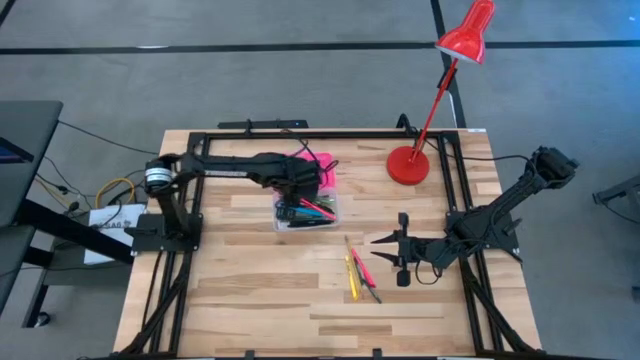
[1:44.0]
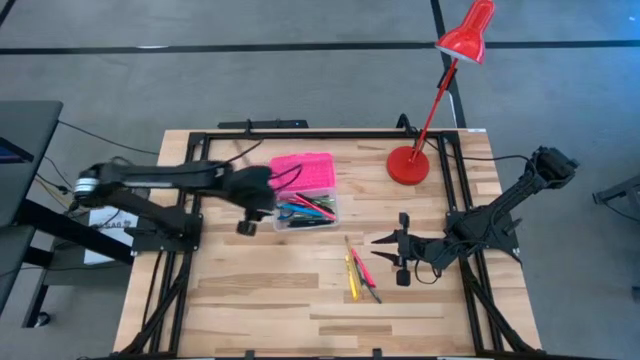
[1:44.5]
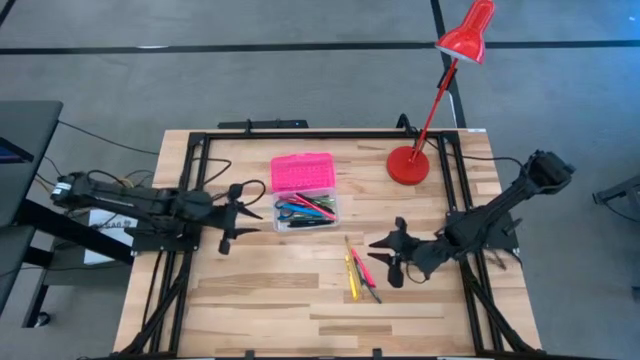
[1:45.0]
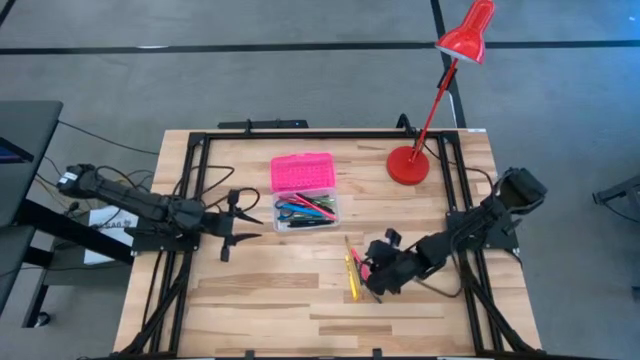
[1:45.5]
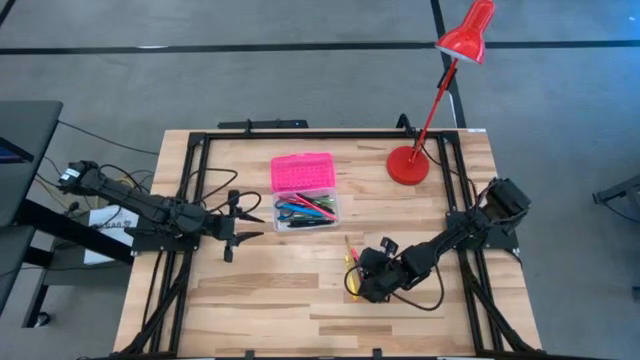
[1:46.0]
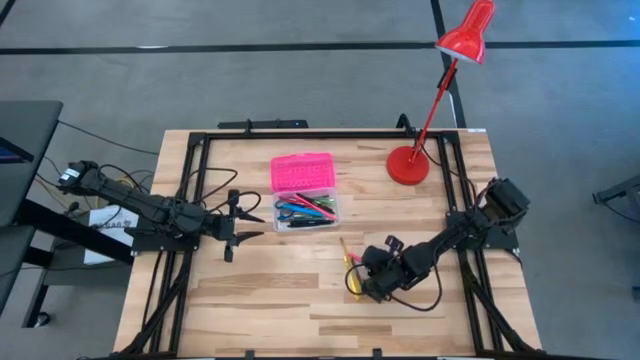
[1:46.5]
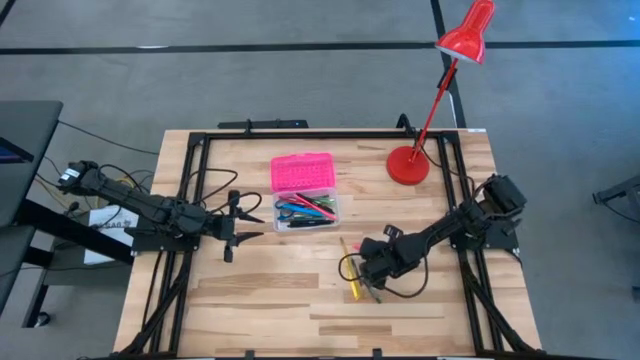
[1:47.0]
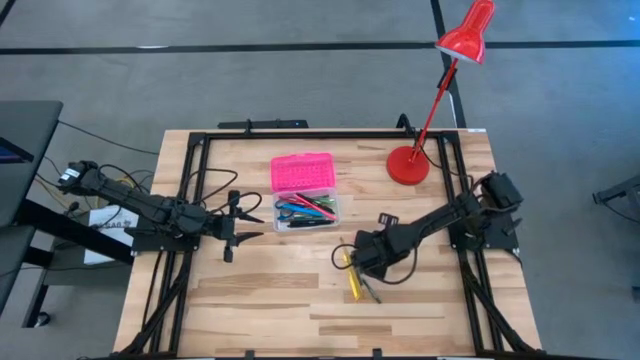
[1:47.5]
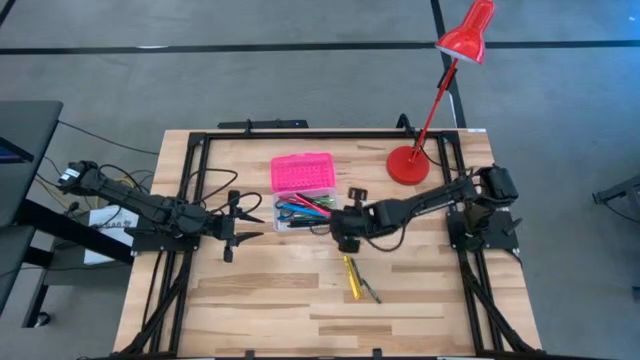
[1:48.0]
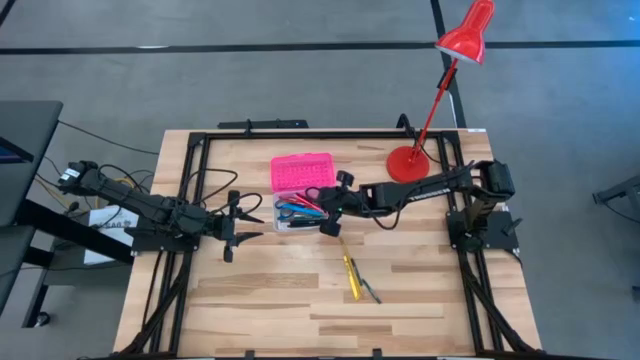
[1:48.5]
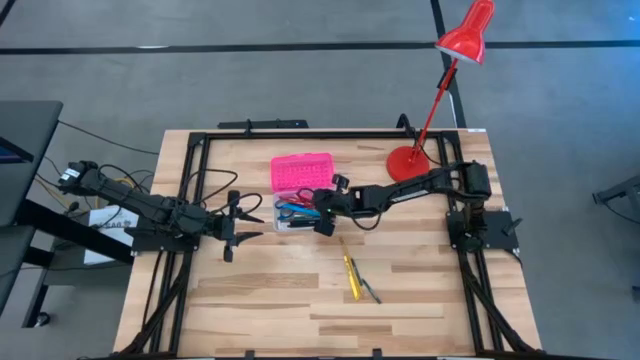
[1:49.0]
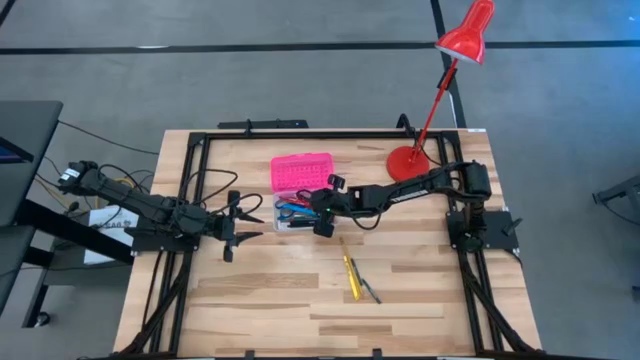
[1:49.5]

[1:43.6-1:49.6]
Task: Pick & place school supplies into a supply box
Put the pink pen into the pink supply box

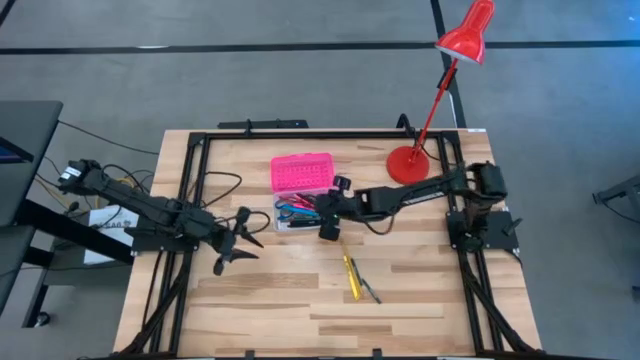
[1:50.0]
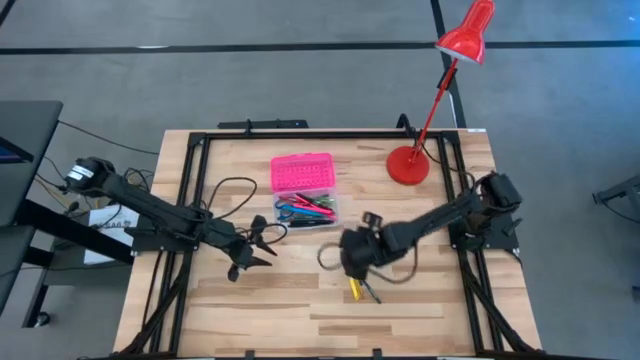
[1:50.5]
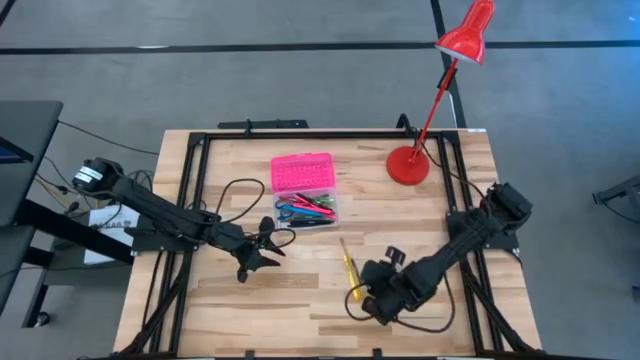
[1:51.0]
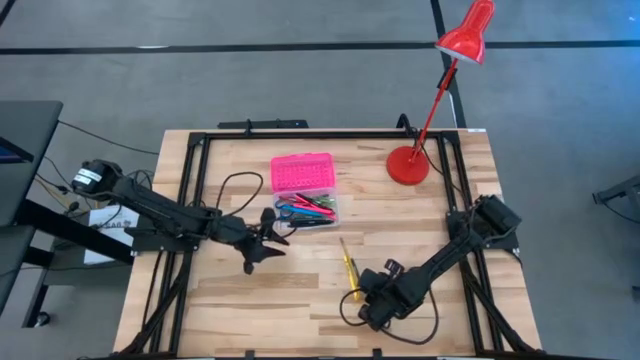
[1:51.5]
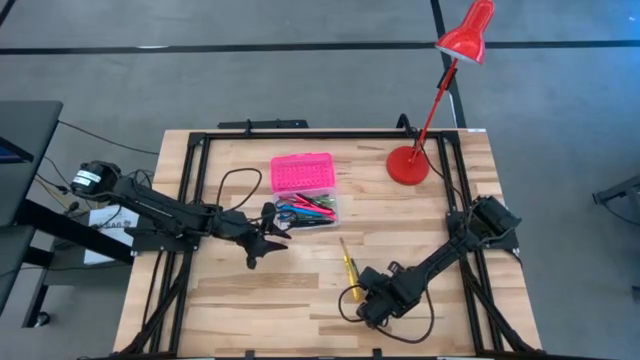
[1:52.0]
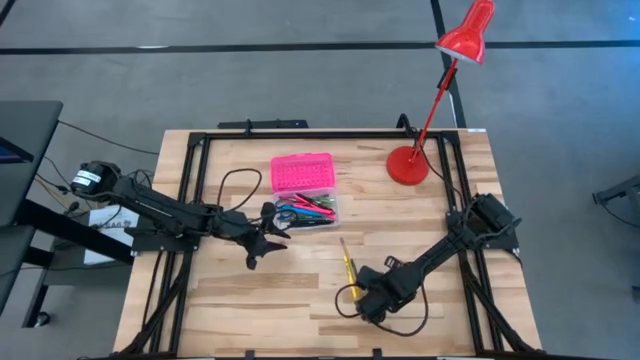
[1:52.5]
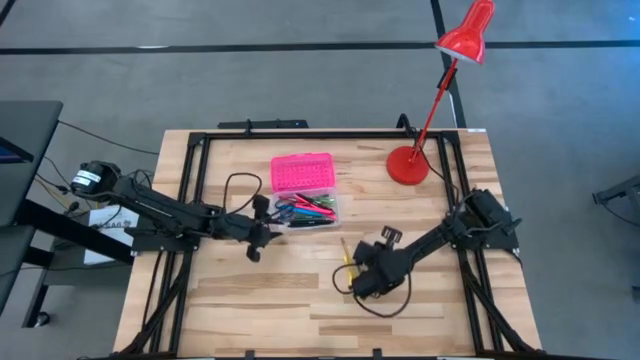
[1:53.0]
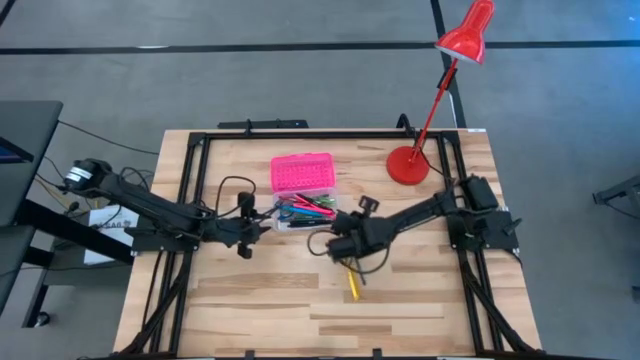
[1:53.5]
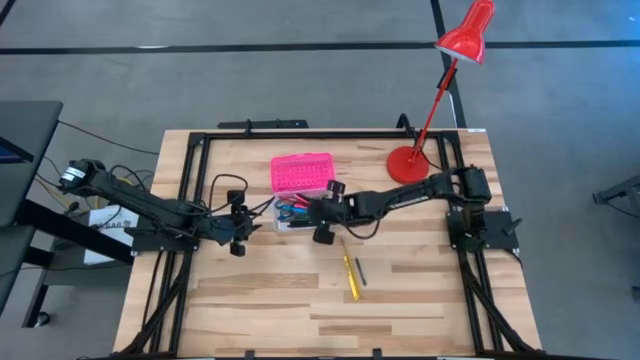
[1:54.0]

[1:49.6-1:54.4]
Put the green crayon into the pink supply box

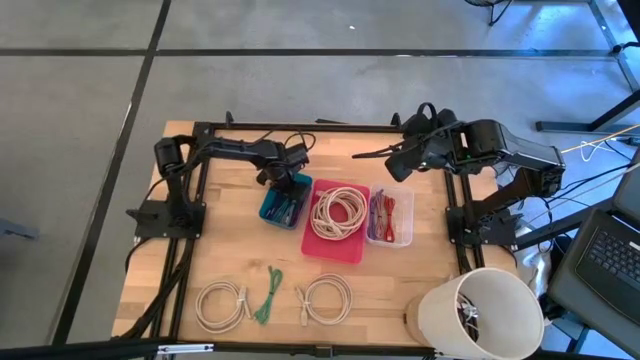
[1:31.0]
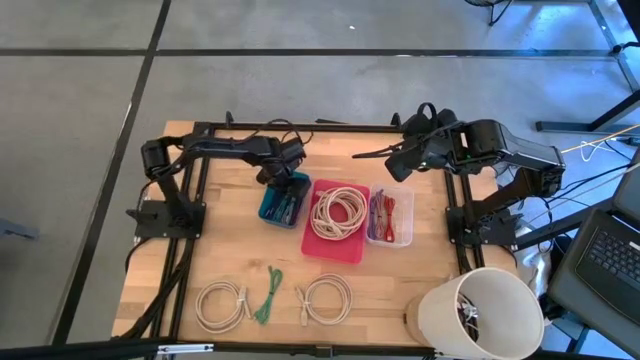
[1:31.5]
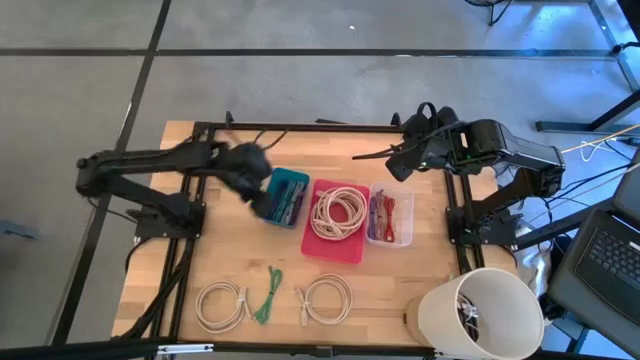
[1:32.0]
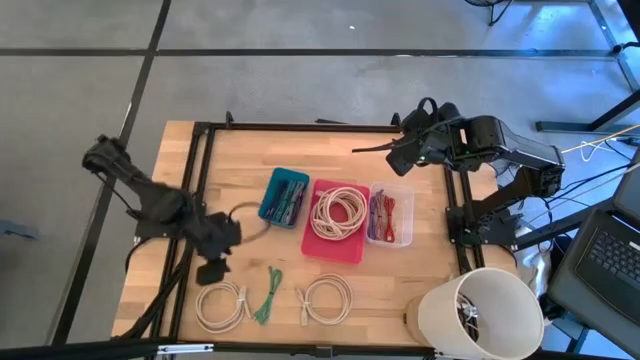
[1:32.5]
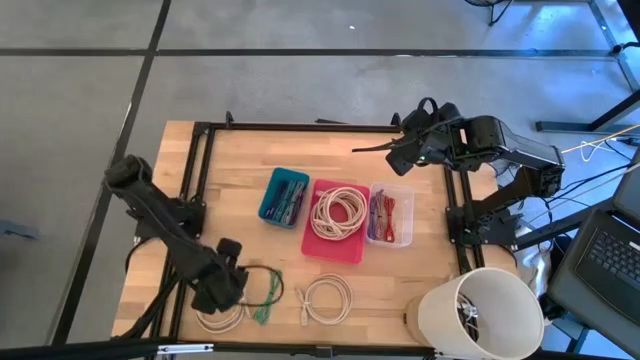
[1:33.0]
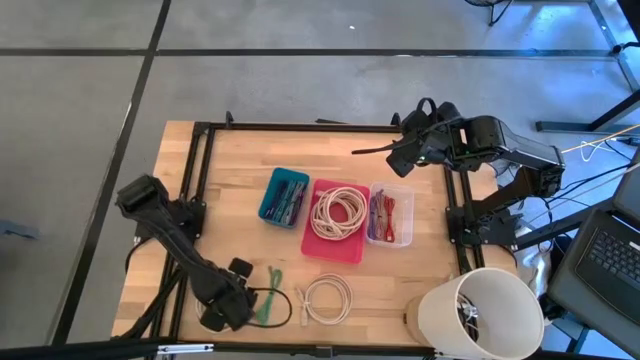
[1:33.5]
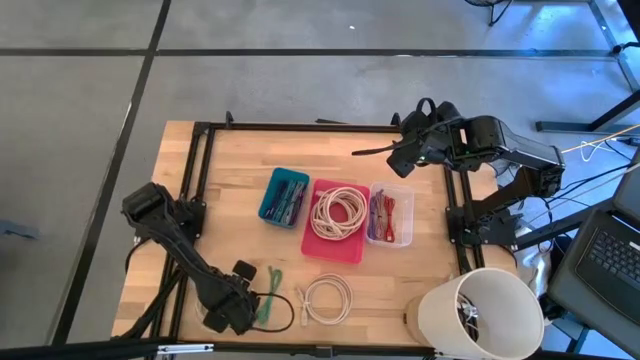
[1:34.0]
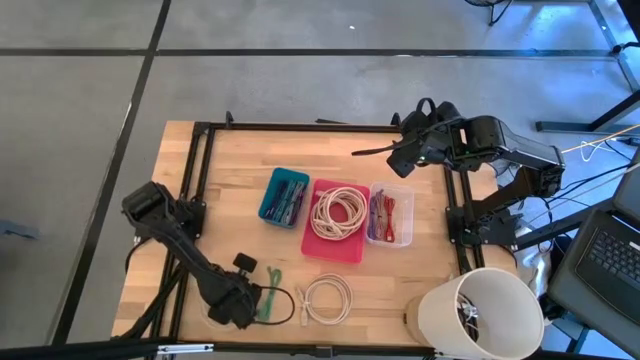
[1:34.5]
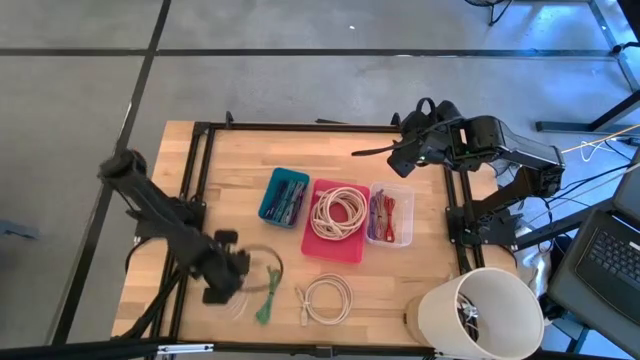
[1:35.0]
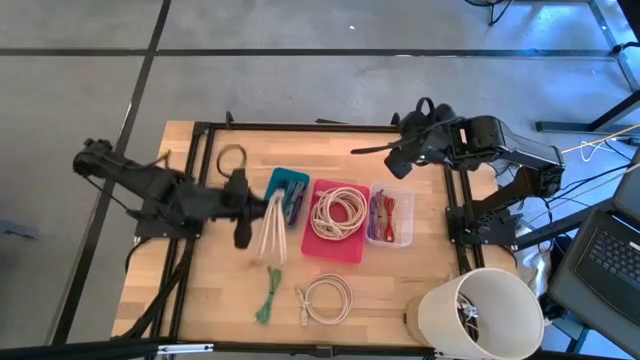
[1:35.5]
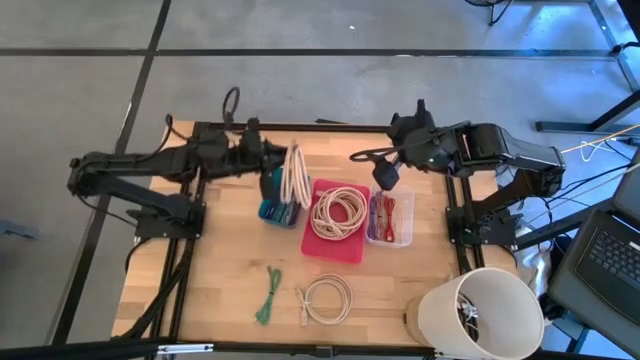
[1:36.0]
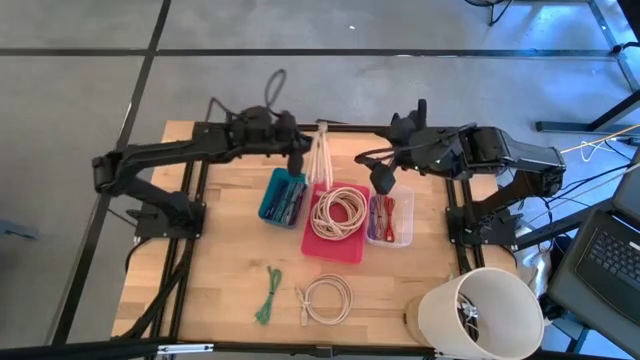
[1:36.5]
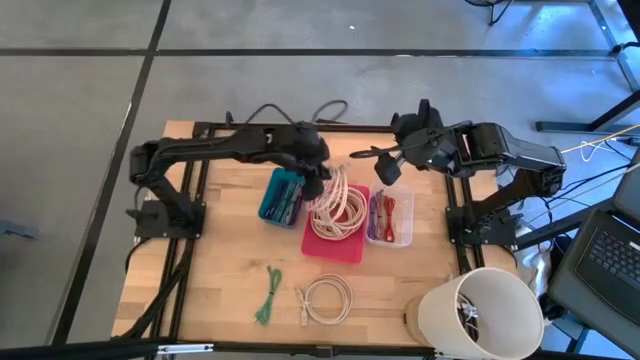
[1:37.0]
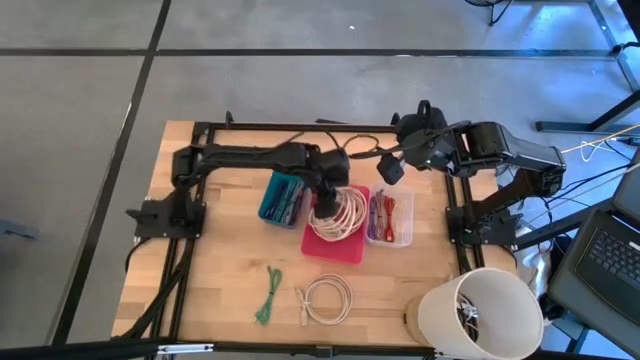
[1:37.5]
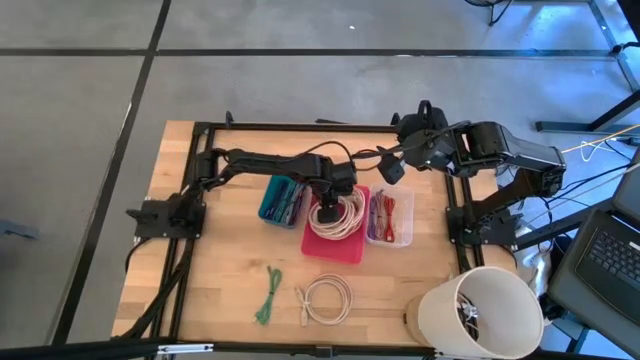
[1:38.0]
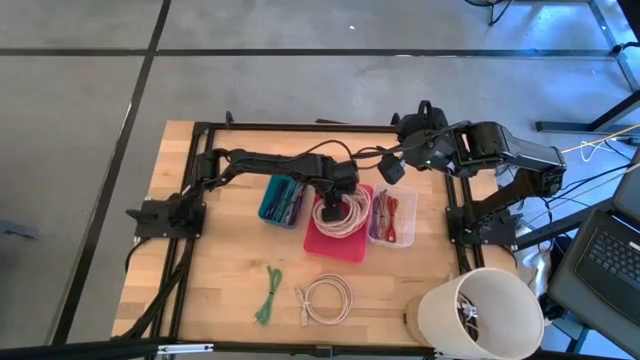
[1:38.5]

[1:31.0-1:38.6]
Task: Pick & Place USB Port
Put the white charger cable into the pink bin
